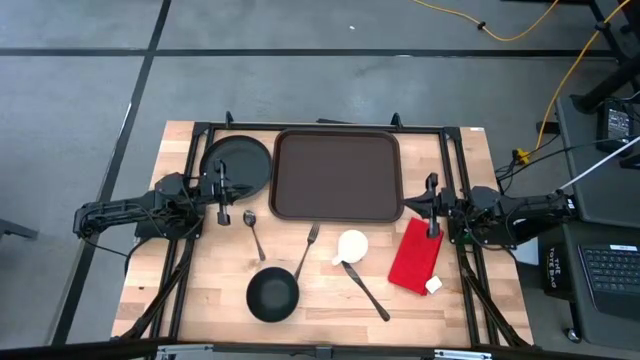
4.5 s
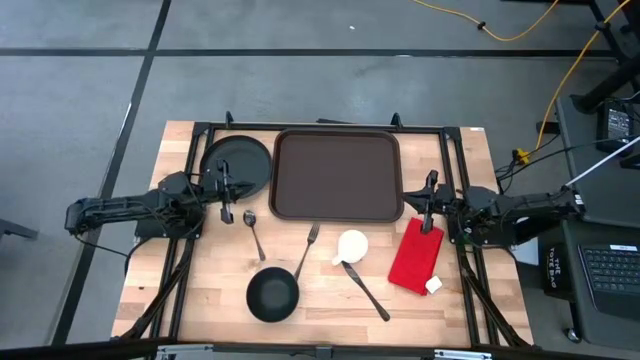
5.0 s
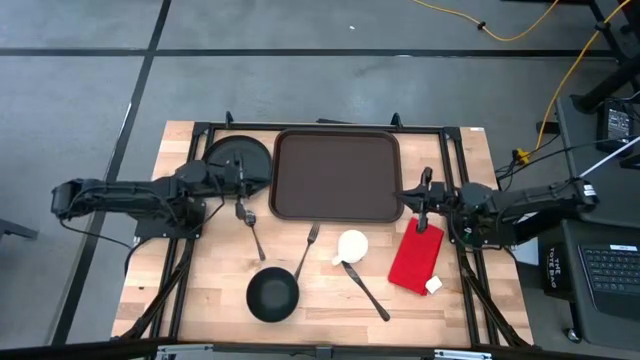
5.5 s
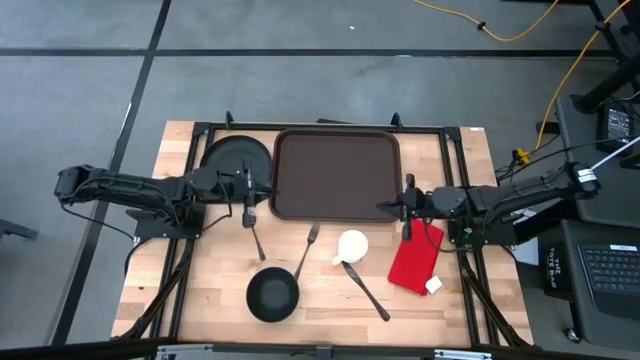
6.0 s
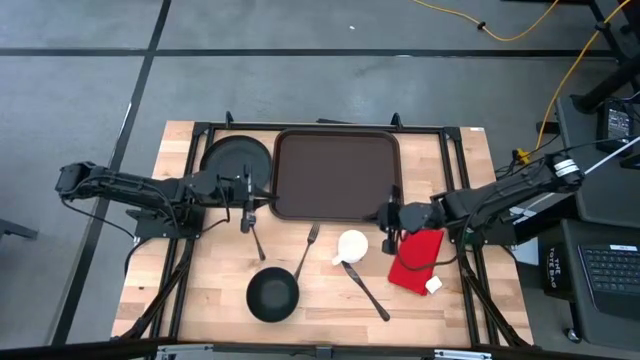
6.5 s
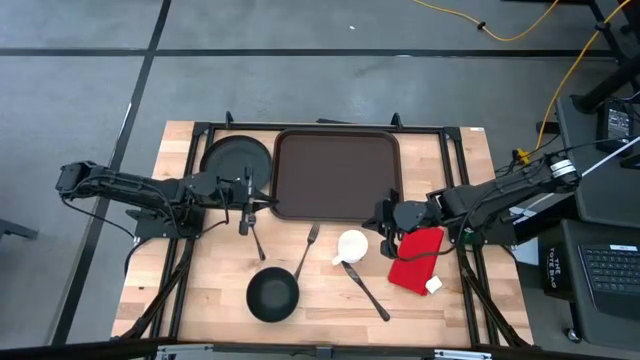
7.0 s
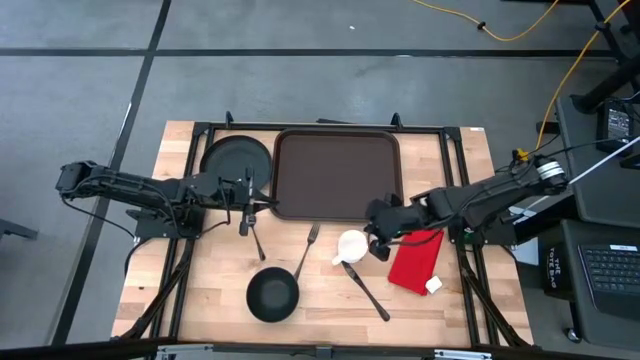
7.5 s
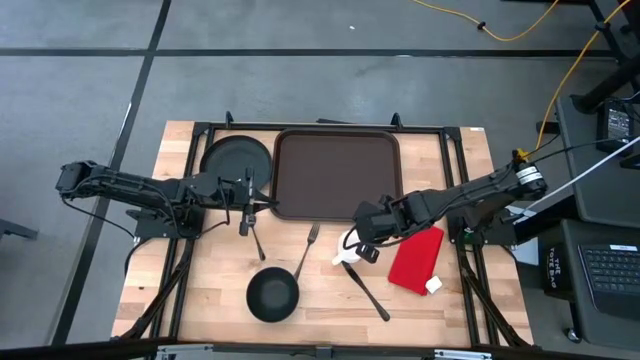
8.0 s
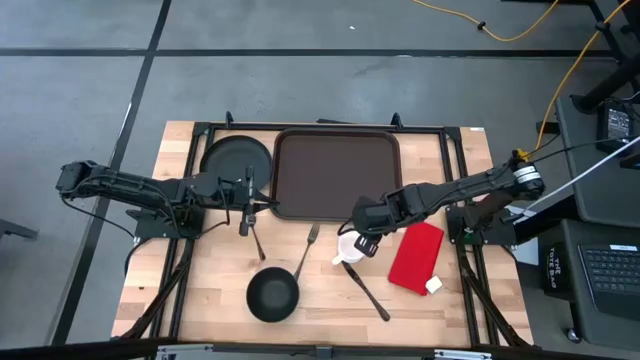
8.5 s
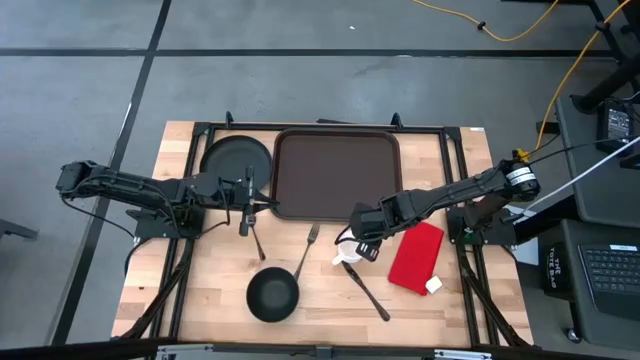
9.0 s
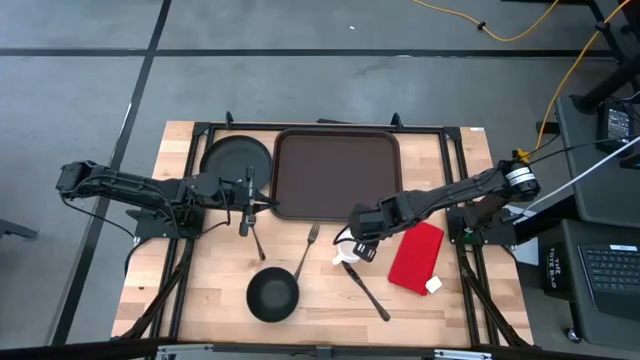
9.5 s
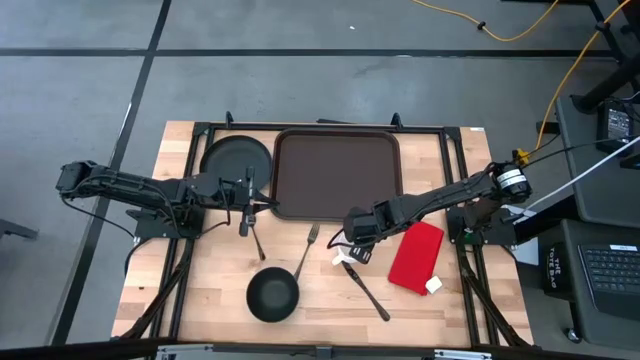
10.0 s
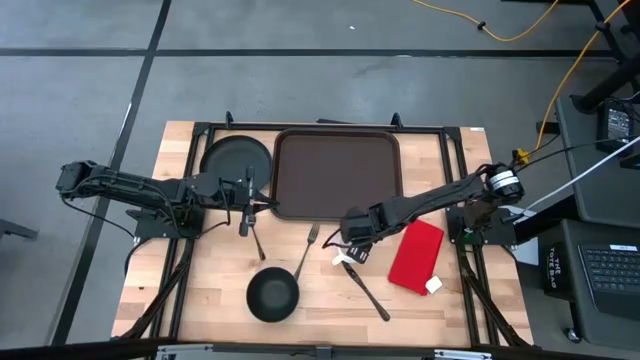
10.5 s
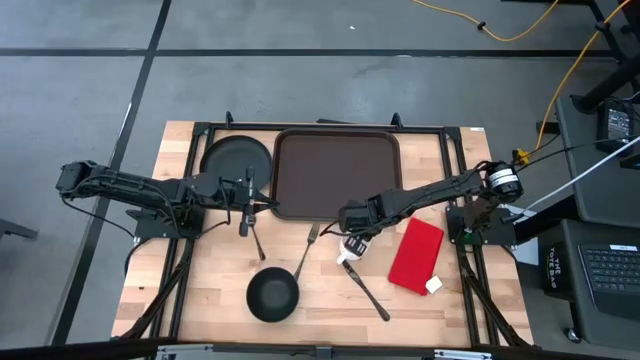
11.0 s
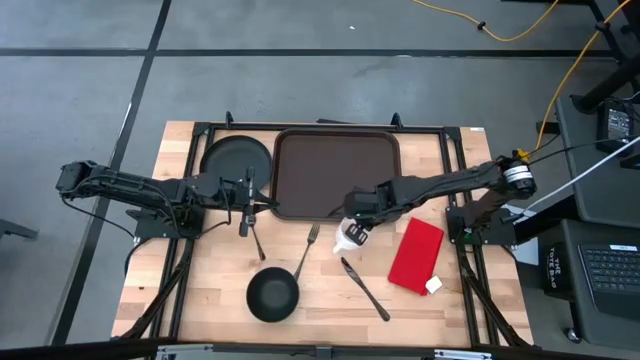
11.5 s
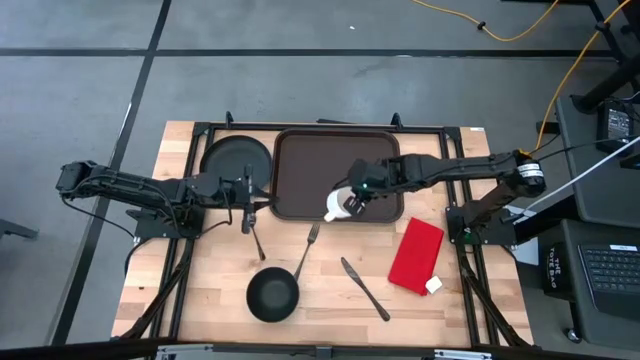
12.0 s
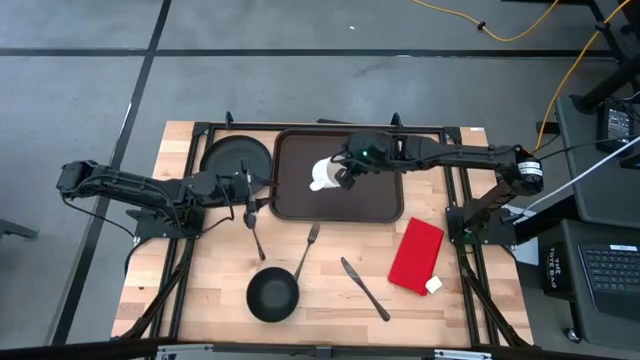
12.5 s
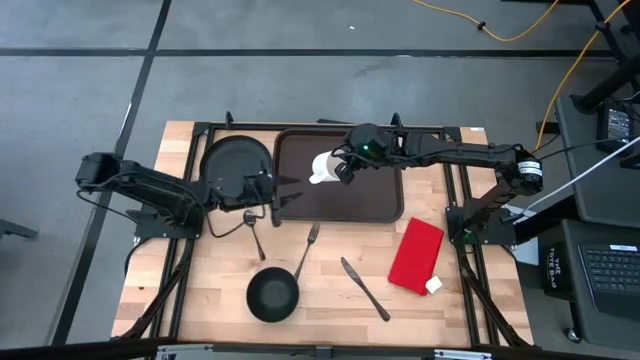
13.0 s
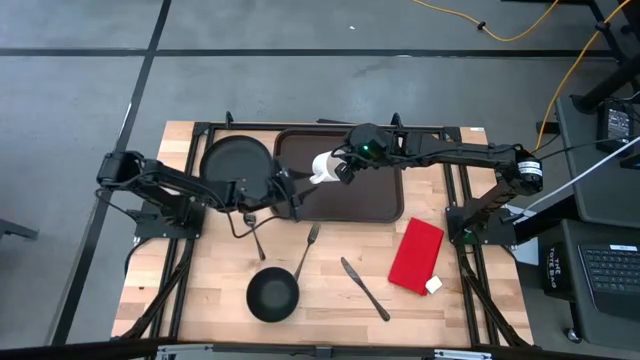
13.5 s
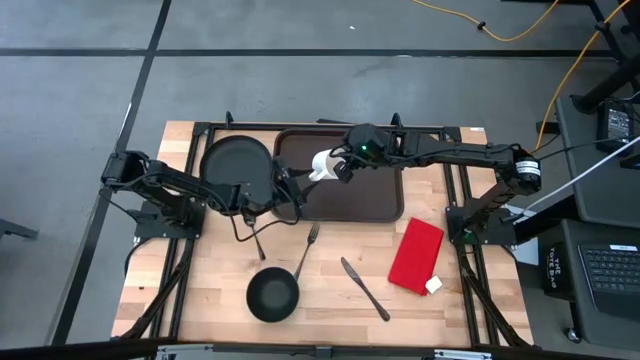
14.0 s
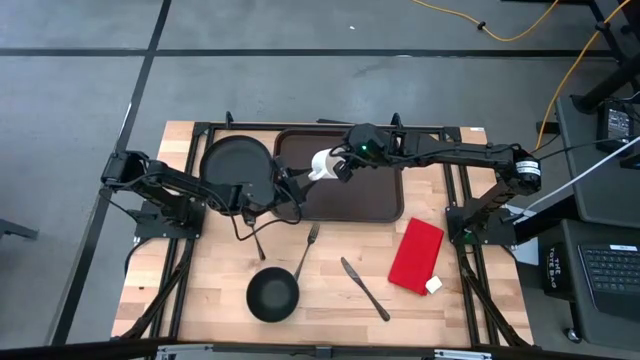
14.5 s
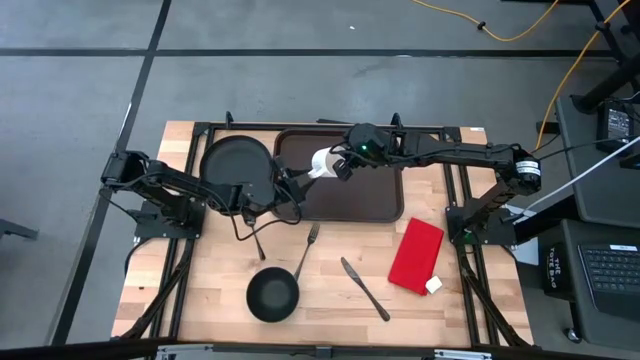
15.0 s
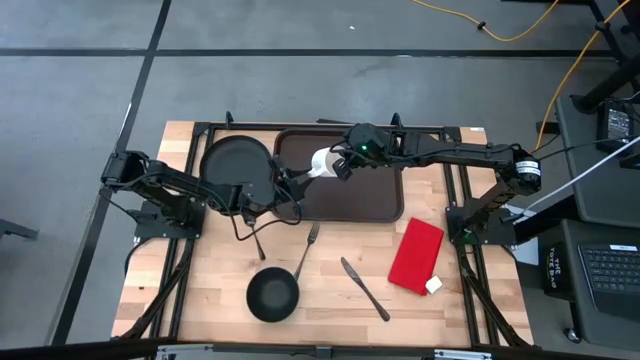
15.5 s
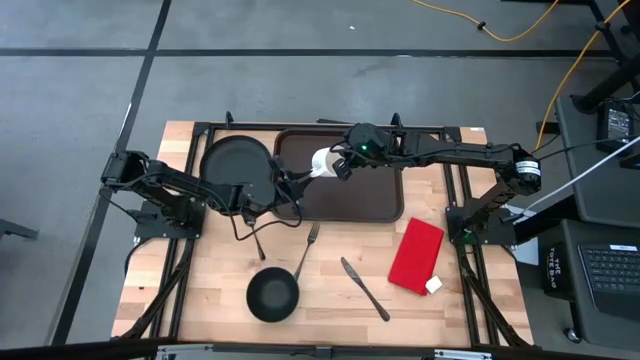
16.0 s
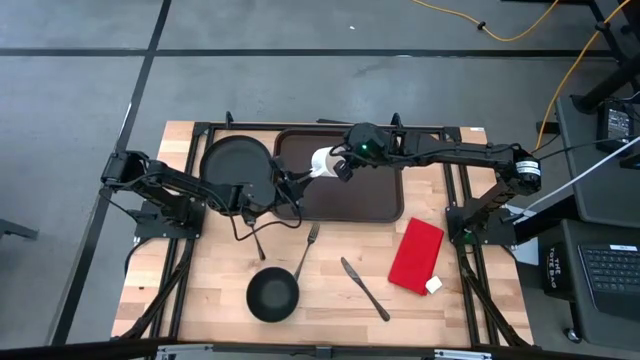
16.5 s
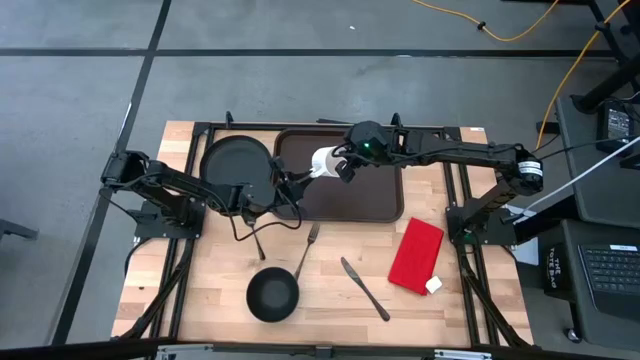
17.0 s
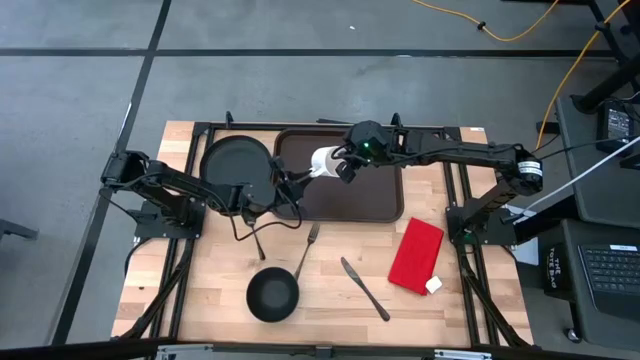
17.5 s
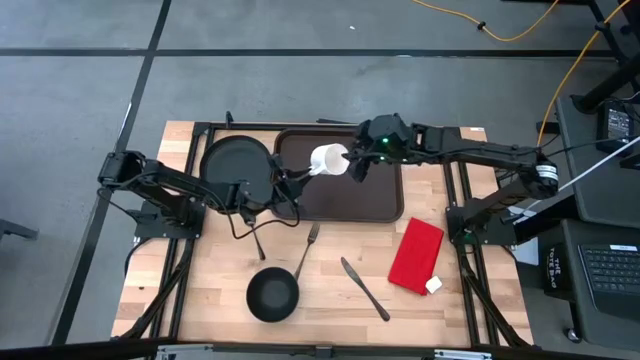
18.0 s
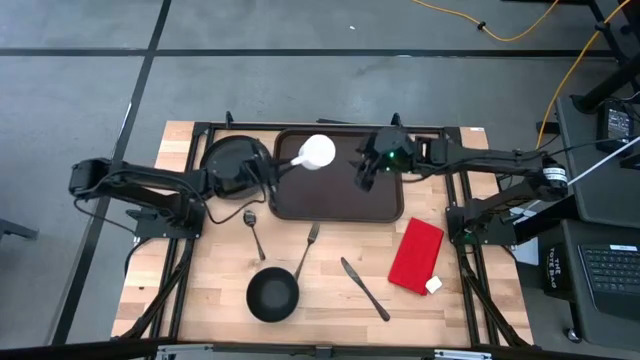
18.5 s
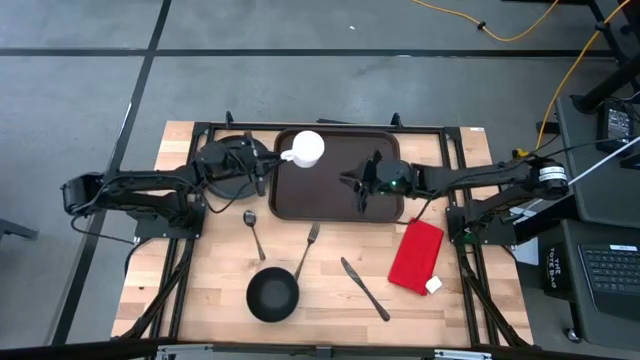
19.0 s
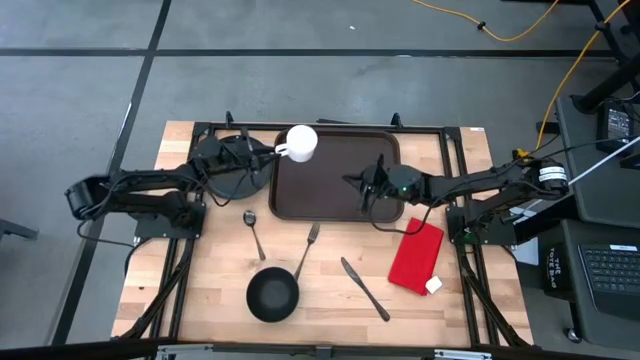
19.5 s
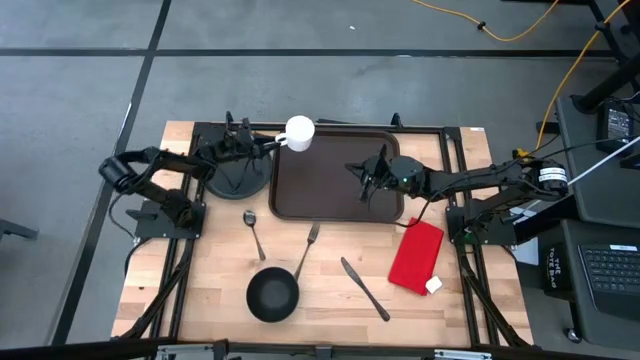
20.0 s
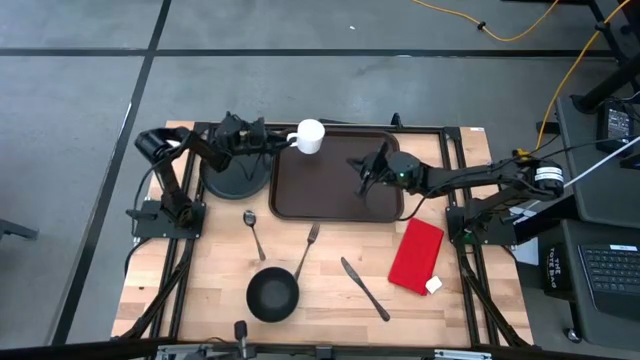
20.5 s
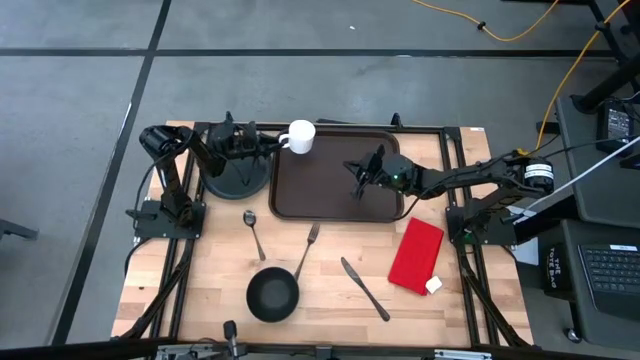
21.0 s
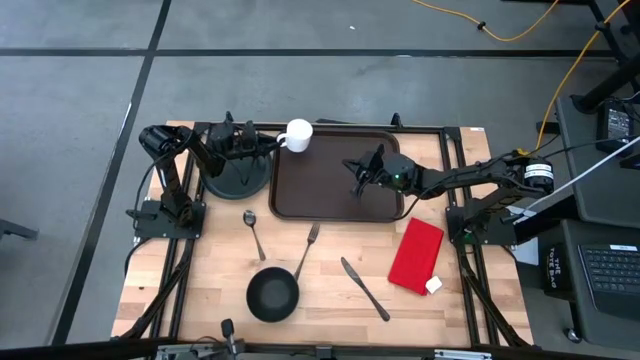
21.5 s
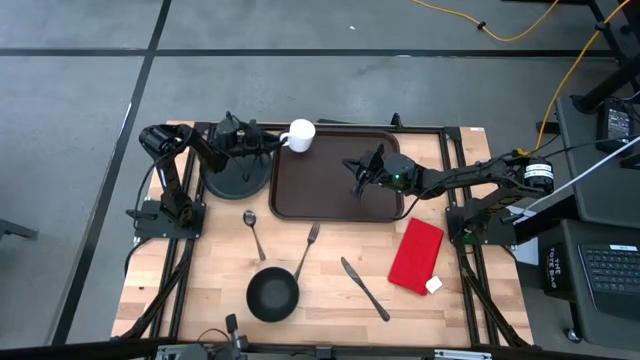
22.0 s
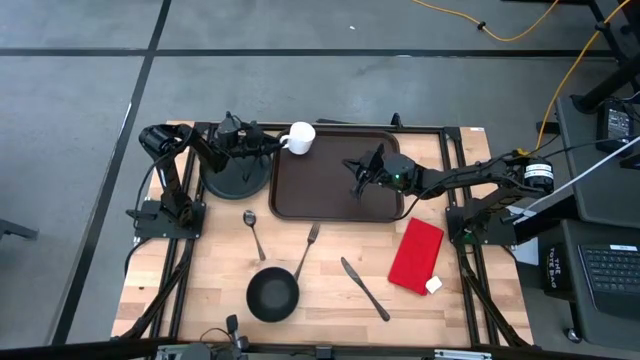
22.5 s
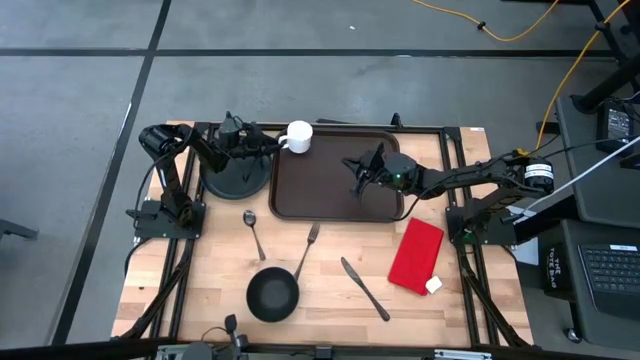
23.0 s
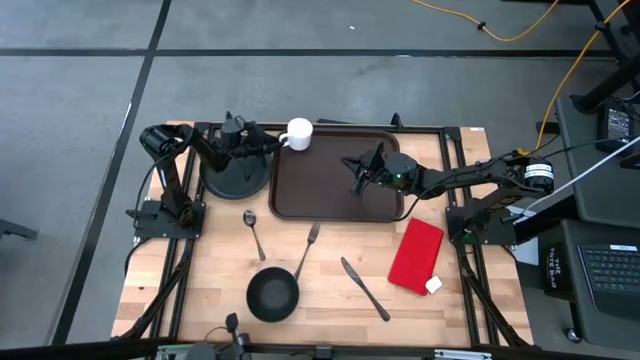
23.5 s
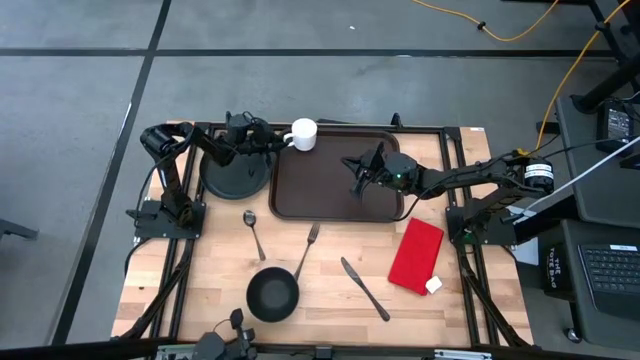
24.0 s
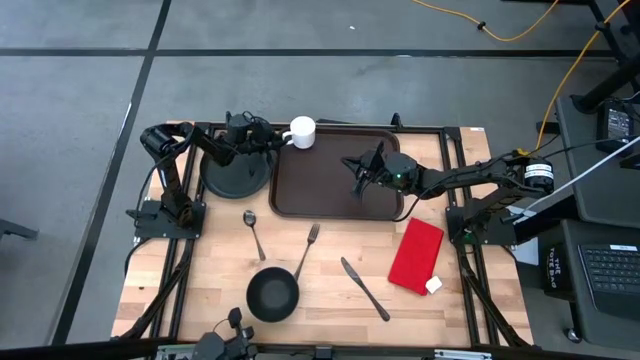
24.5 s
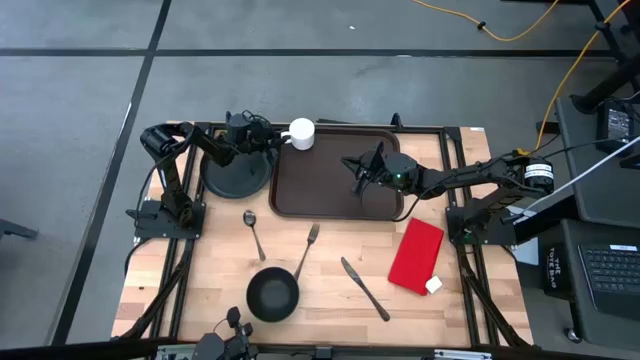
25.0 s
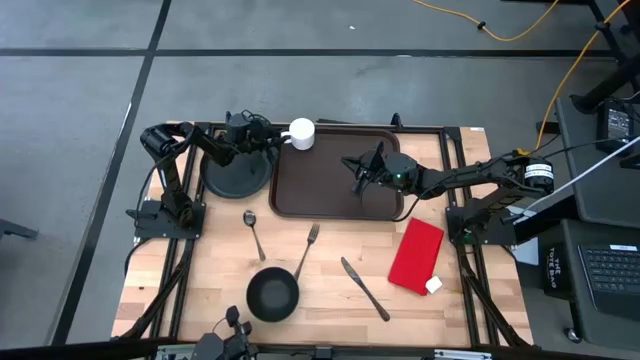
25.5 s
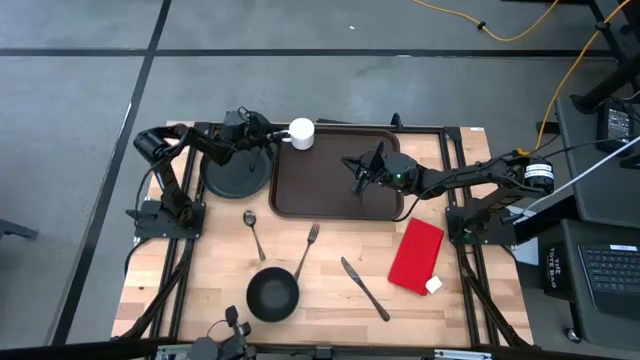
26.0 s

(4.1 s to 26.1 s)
Task: Set up tray
Put the white mug on the brown serving tray
